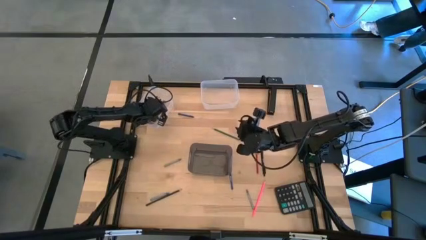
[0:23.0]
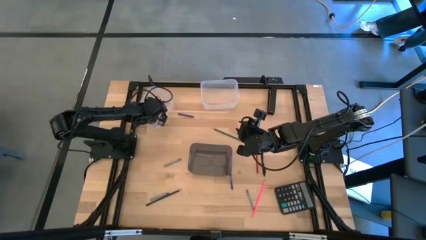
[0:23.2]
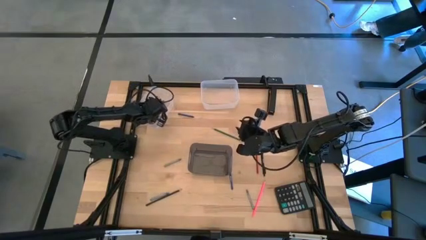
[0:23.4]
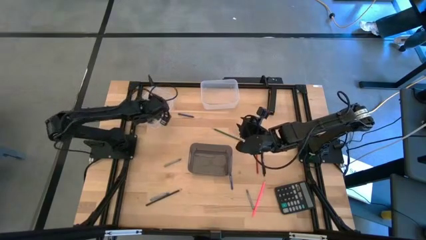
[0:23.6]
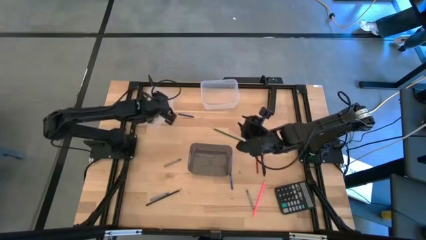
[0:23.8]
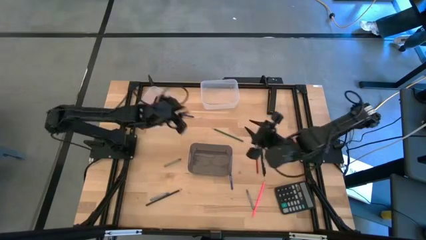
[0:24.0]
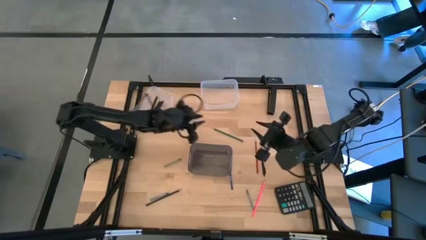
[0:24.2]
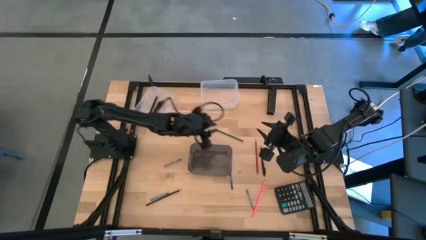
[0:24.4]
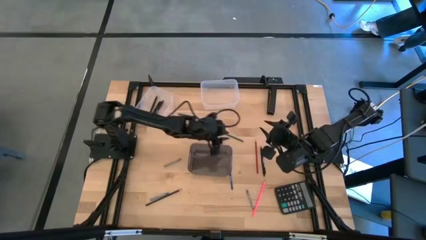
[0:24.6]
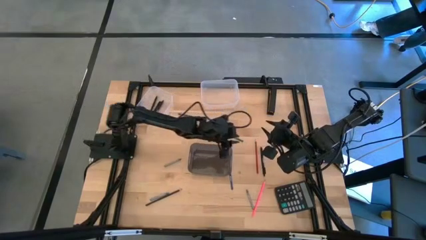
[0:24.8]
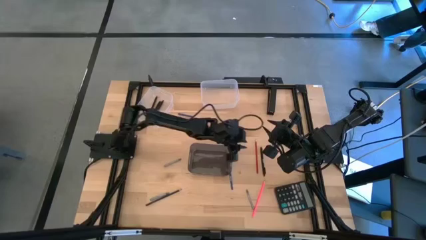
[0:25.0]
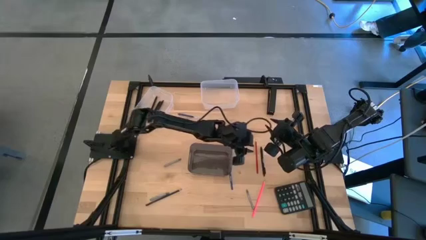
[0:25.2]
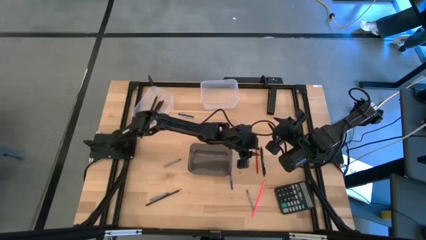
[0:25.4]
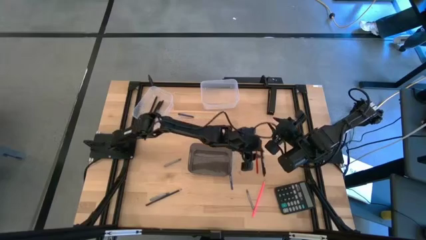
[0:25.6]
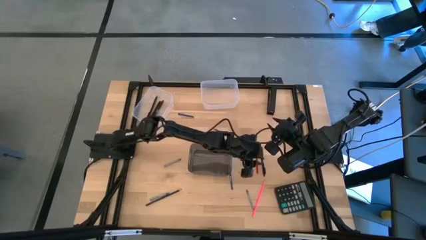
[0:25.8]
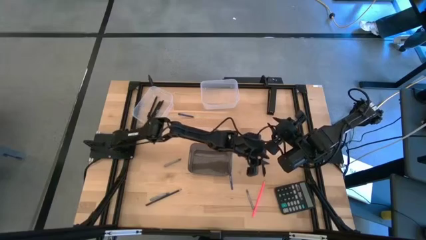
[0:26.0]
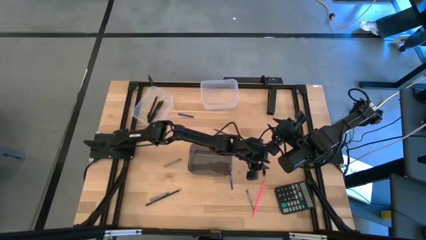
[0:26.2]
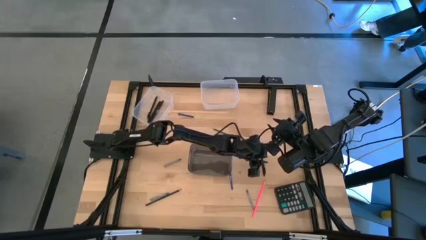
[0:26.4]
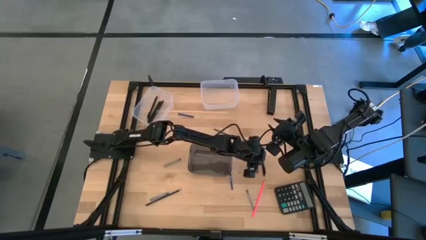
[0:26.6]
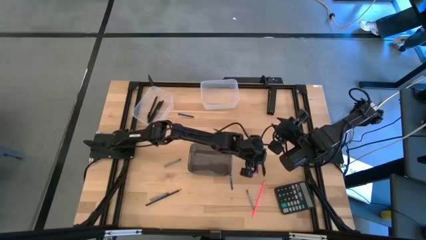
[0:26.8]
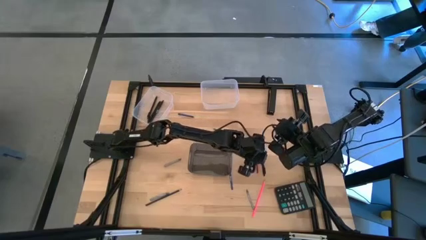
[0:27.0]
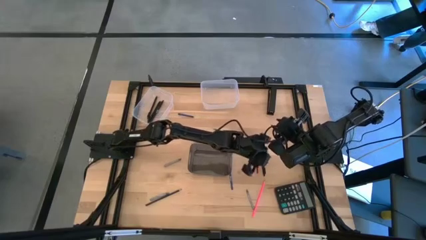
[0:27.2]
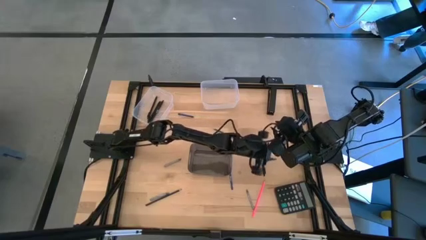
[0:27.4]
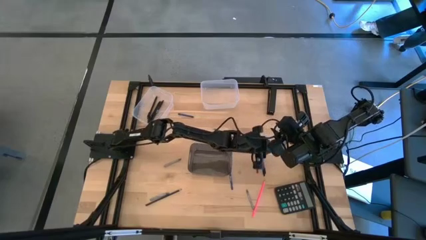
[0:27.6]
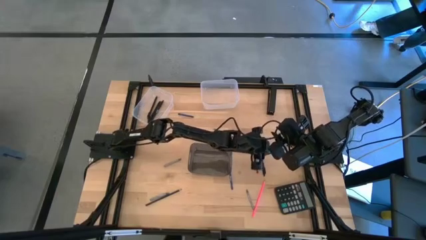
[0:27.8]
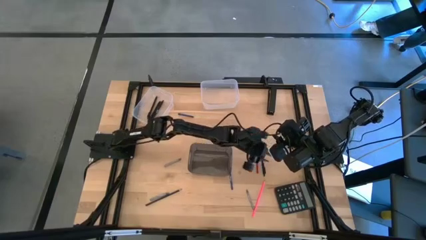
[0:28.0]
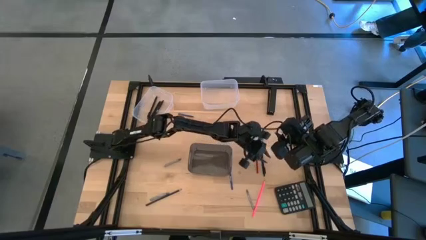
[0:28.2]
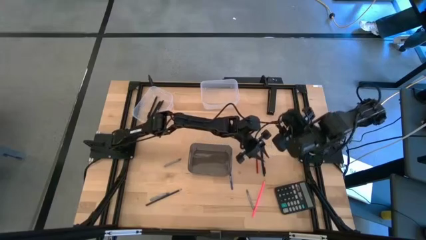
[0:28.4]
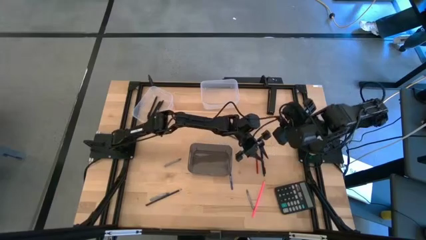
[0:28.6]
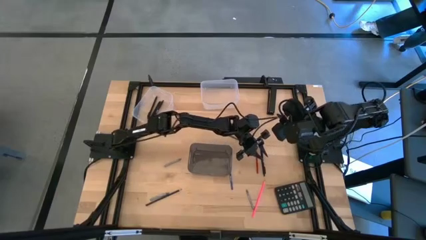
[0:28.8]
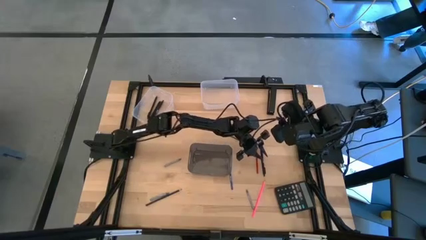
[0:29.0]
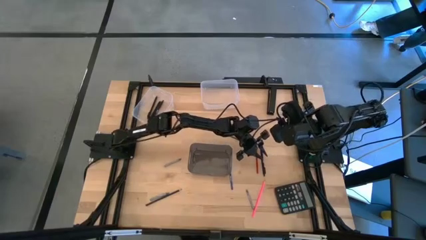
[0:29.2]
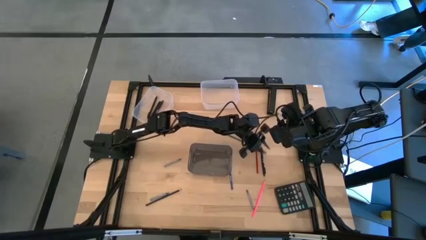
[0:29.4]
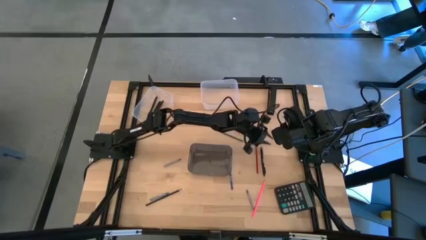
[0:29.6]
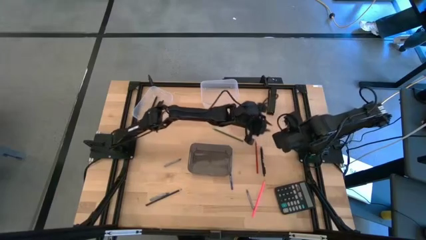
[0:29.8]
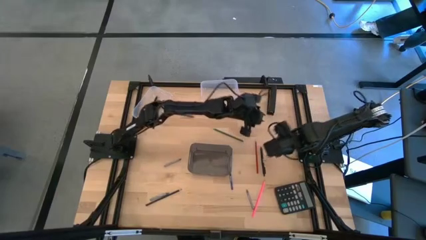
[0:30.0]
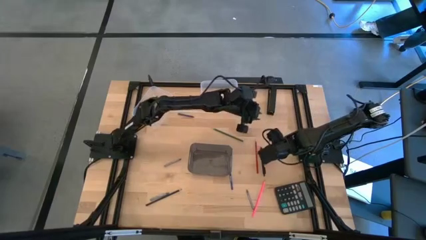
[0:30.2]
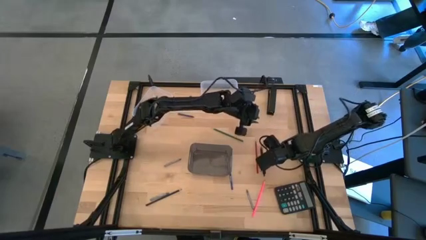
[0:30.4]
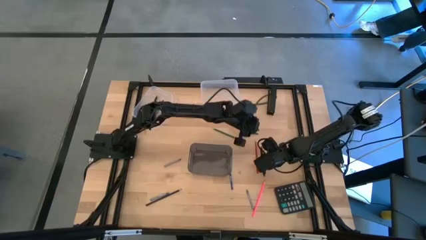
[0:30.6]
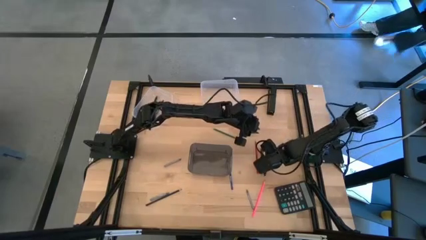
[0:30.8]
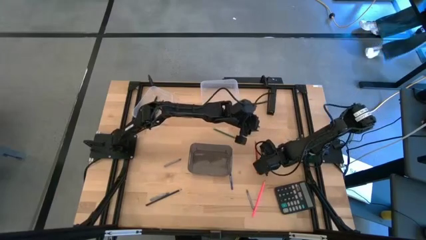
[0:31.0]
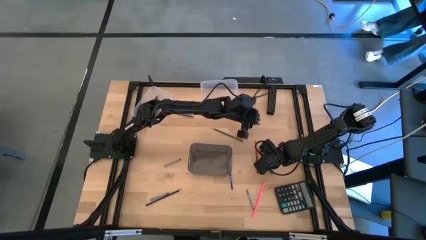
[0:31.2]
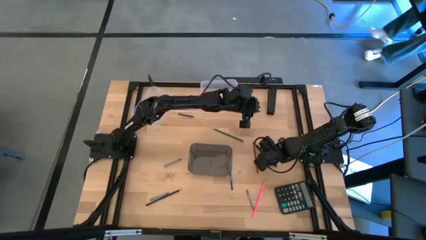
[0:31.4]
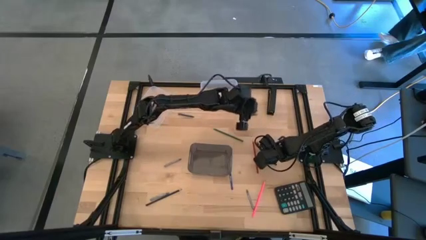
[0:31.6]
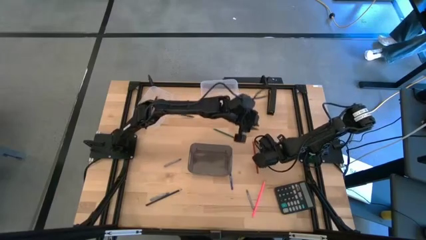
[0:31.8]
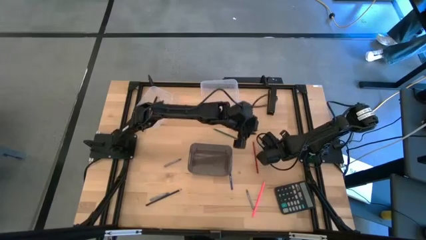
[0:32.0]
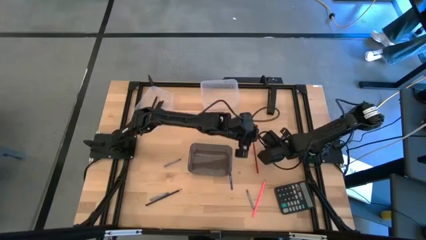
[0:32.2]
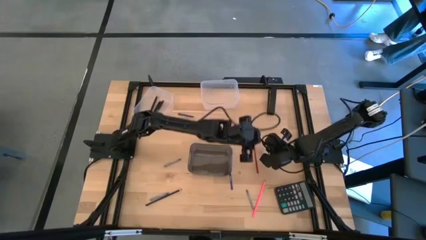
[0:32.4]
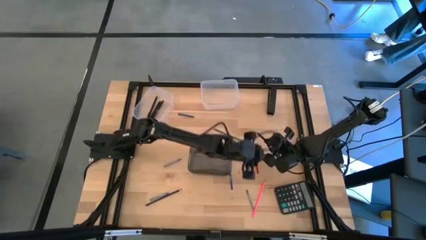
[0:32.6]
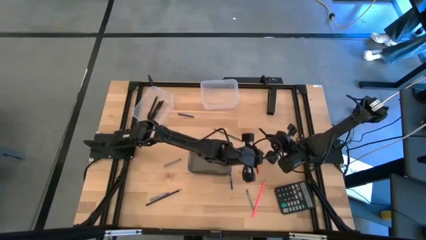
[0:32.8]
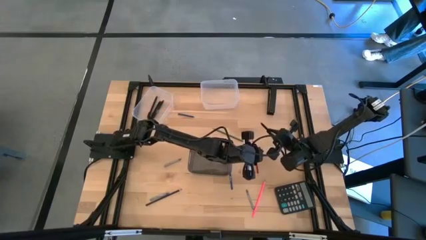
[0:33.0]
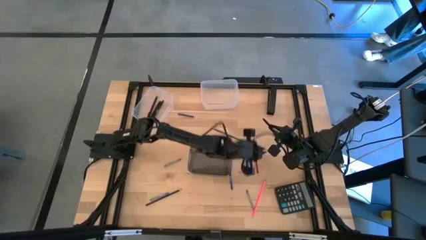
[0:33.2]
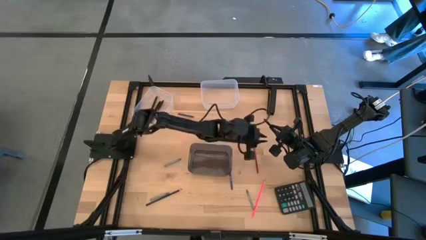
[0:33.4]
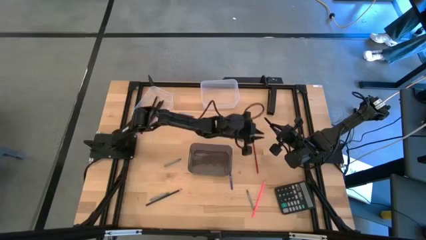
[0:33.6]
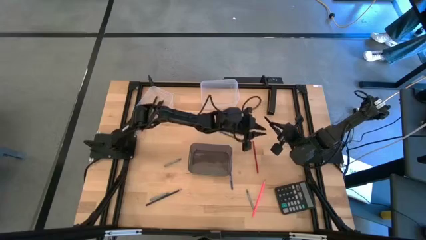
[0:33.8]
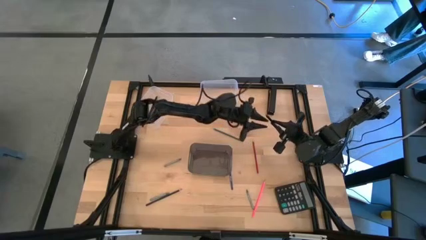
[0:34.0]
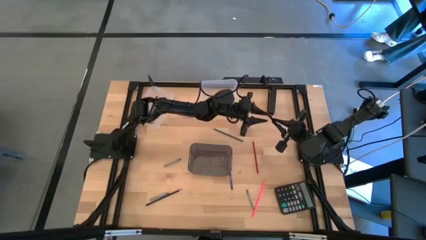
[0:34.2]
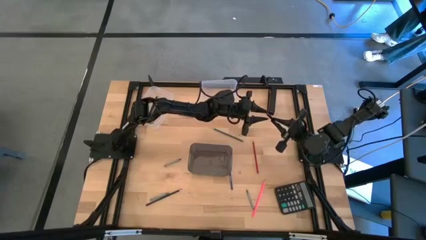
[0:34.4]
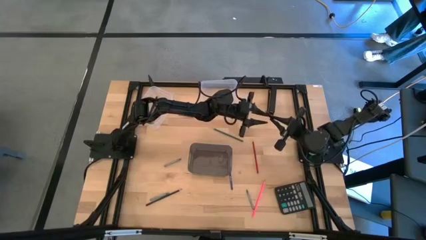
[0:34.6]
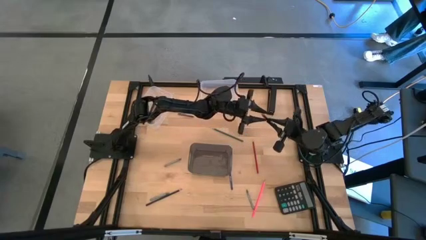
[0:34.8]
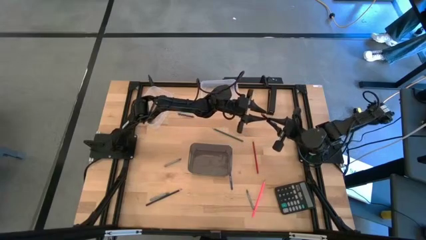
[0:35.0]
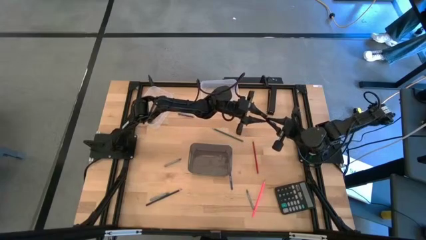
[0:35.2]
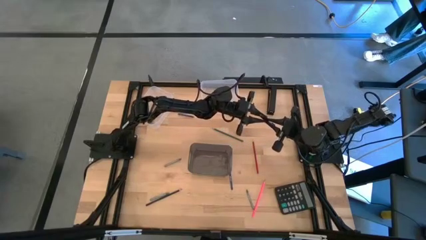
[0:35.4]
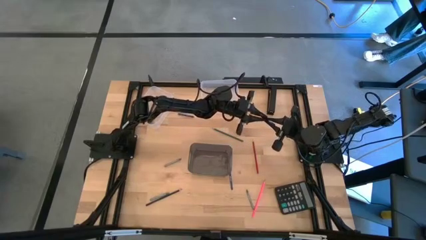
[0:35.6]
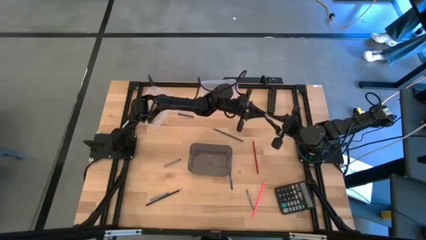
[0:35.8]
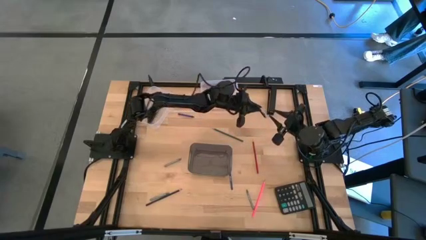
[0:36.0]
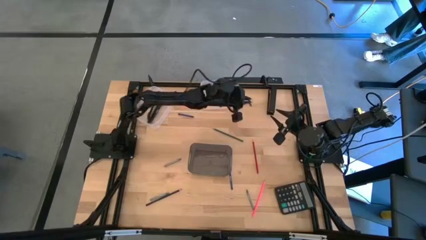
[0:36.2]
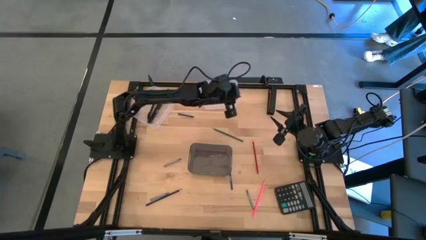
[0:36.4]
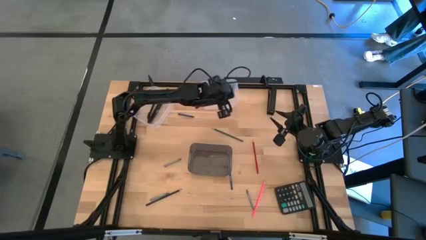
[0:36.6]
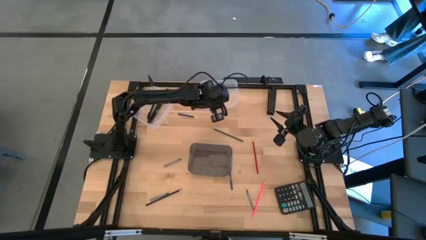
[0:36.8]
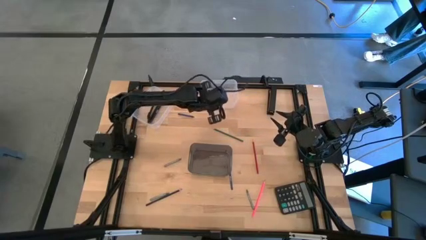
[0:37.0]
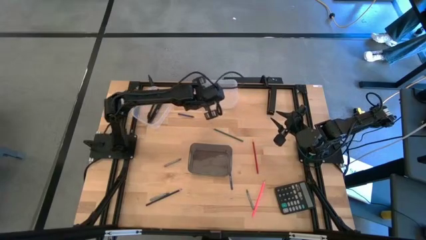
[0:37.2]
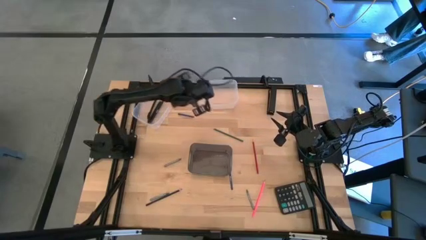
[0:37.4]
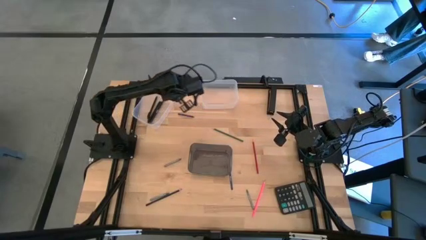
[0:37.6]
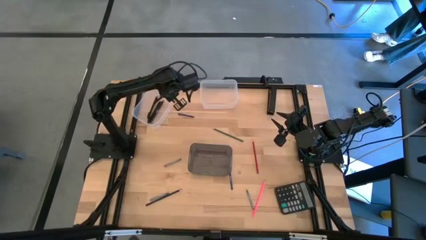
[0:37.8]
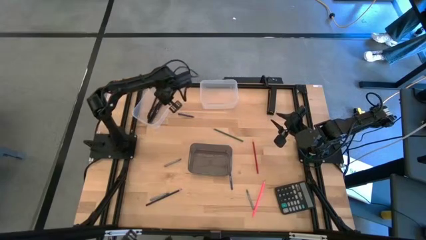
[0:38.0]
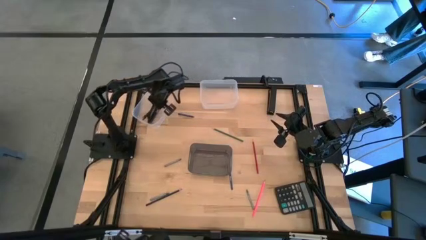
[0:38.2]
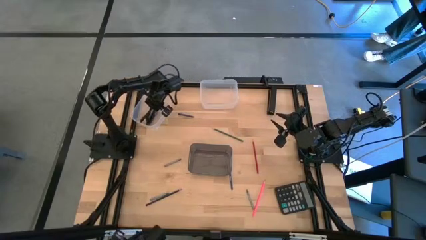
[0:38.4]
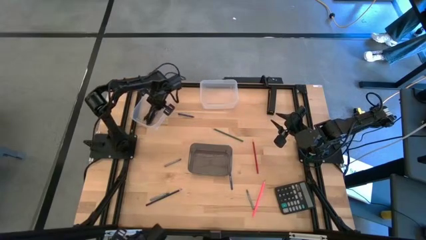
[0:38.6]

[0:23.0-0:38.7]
Task: Sort crayons/erasers/pens/pencils in bins
Put the black pen into the left transparent bin

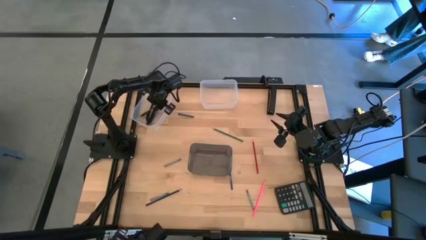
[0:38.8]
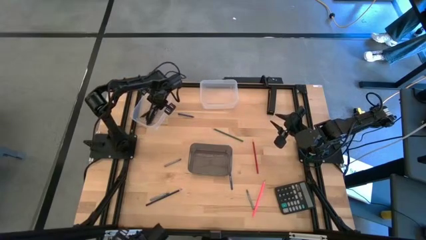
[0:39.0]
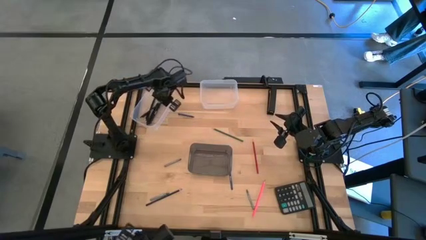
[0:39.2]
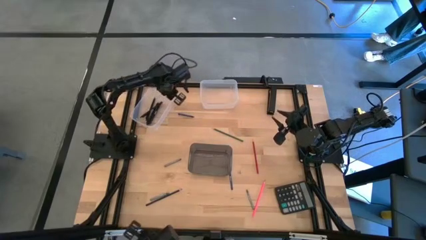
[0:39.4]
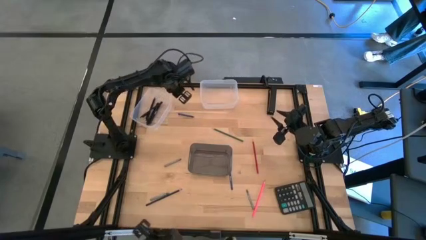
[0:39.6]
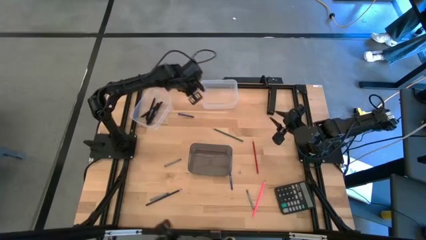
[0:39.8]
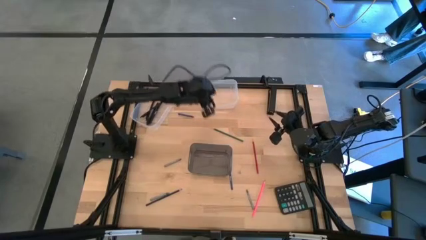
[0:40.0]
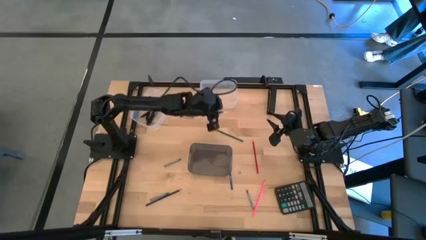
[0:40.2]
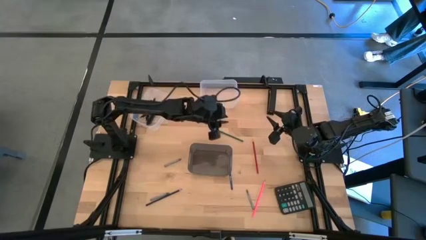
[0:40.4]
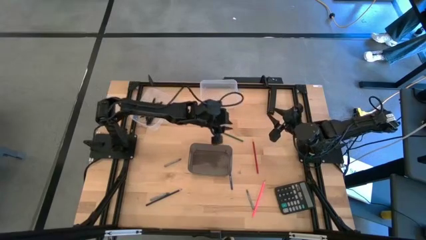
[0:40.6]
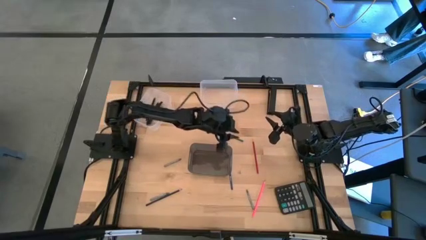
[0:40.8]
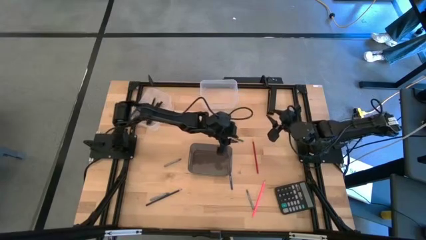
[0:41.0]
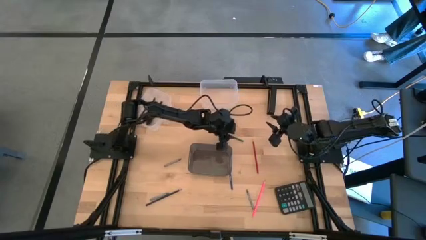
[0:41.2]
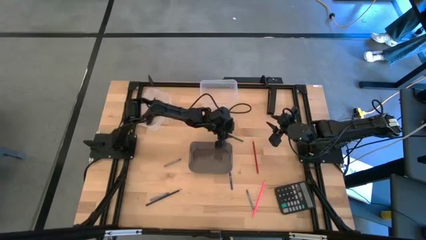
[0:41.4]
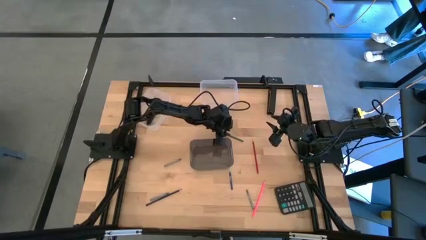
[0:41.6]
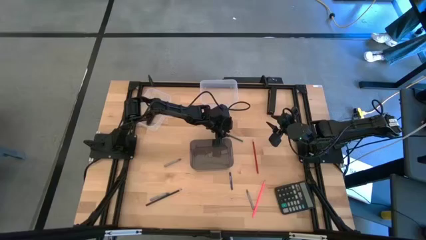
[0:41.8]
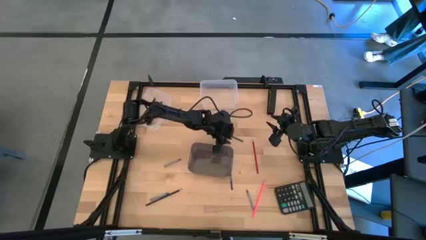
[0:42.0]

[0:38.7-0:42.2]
Adjust the black bin on the table
